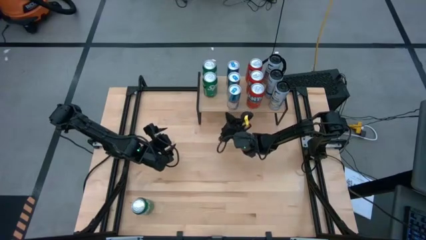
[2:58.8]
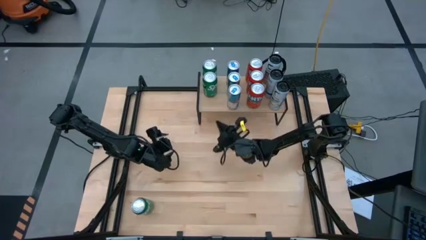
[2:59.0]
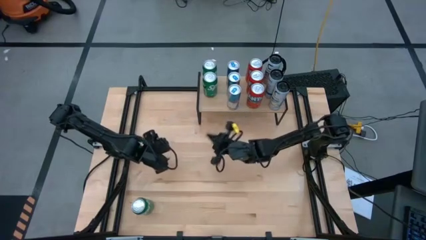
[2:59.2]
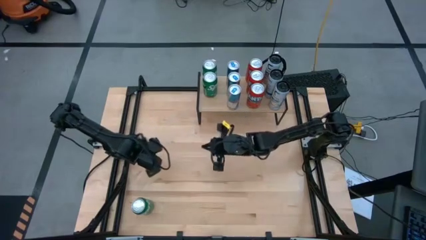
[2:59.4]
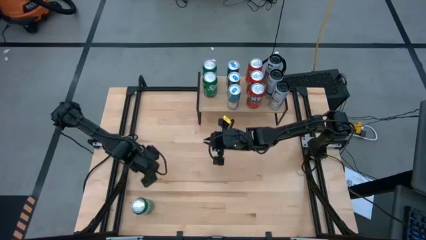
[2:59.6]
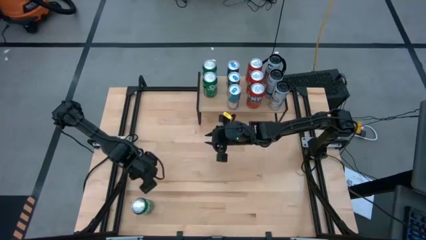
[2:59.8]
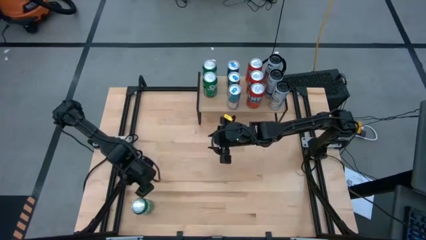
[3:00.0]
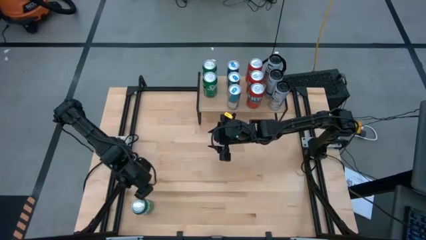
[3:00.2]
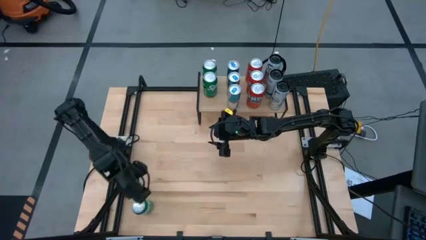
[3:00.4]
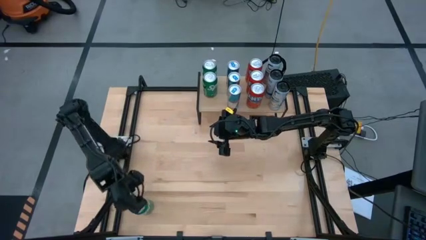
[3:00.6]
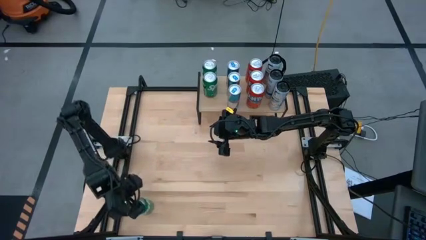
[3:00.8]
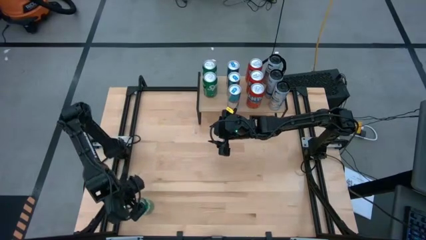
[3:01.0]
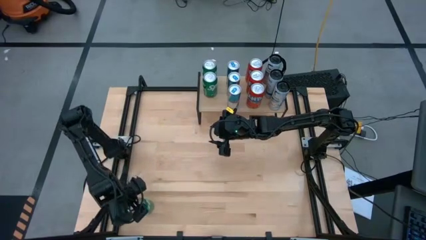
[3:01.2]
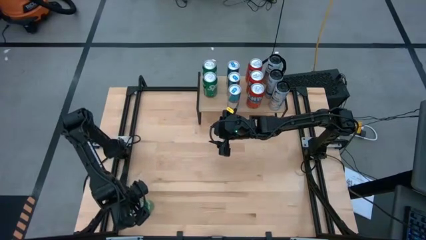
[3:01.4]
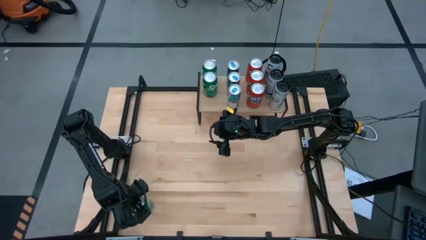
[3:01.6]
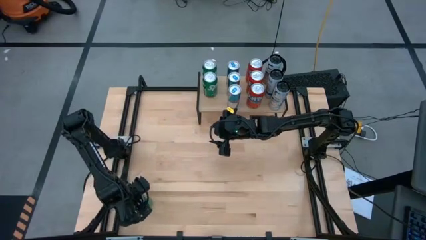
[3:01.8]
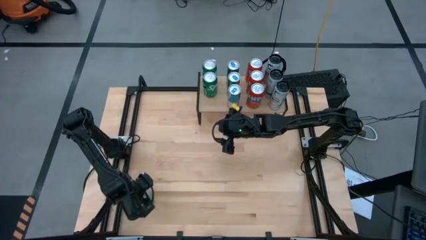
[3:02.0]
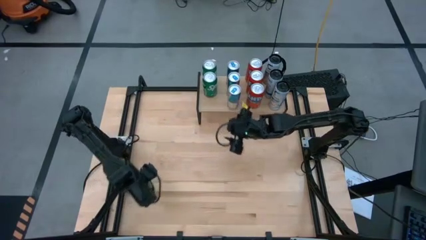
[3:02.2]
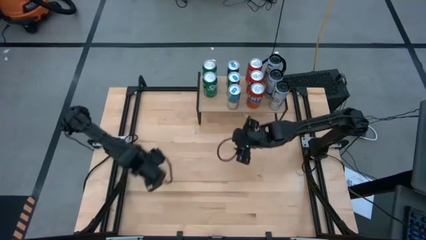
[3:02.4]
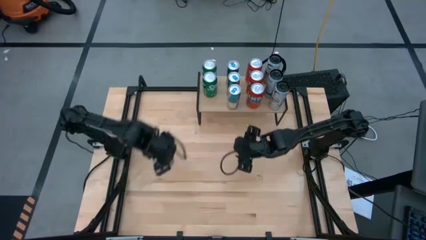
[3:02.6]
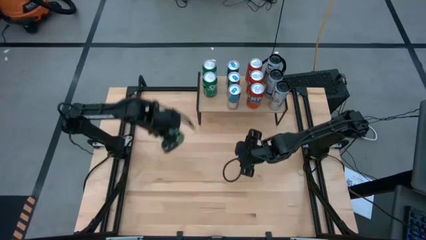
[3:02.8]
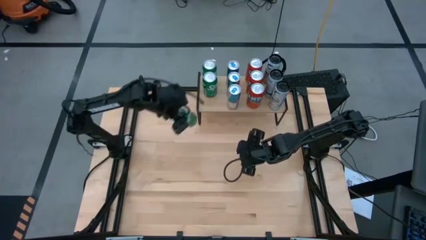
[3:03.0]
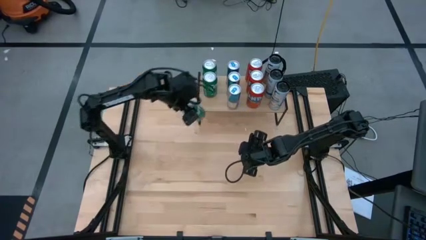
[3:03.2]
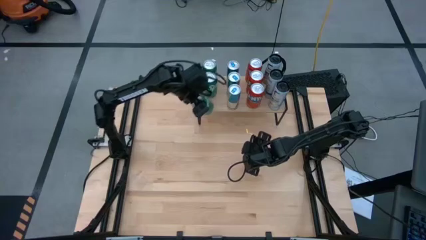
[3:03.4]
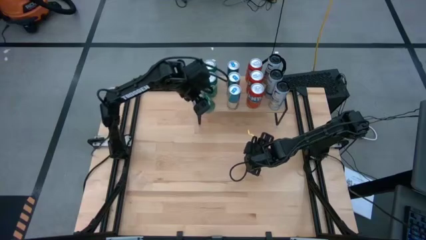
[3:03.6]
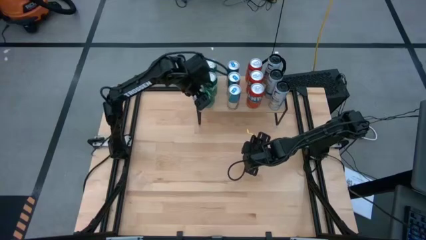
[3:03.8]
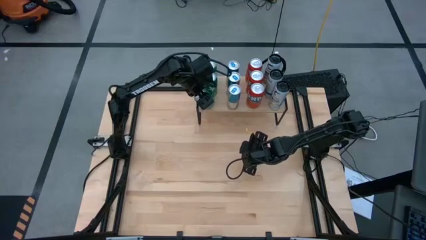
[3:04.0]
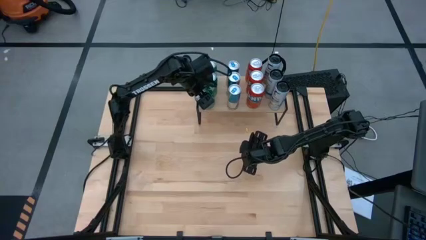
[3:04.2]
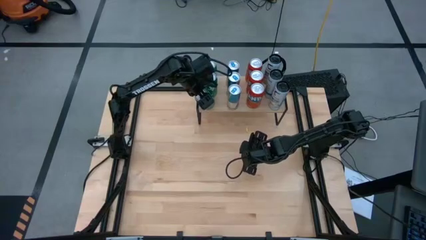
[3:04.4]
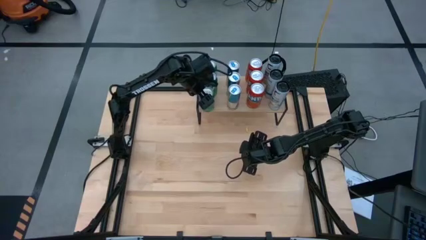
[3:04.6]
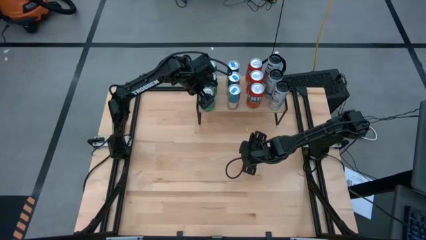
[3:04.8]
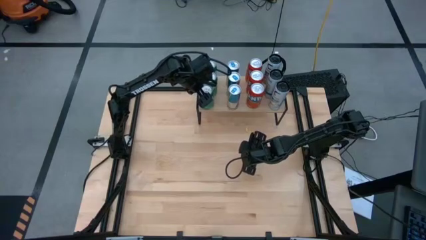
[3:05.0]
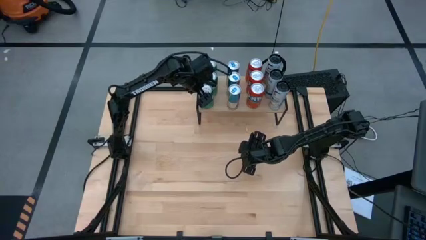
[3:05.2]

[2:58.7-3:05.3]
Task: Place canned beverage on shelf
Put the green soda can on the shelf aligned with the other green soda cans

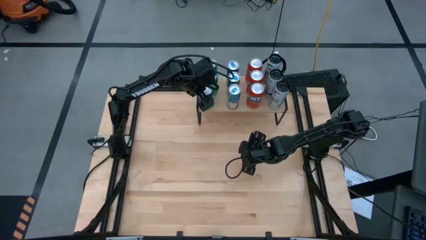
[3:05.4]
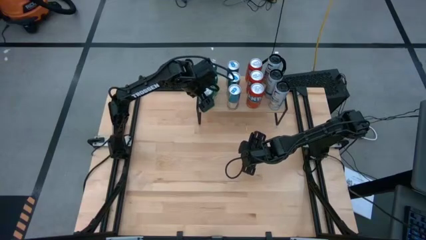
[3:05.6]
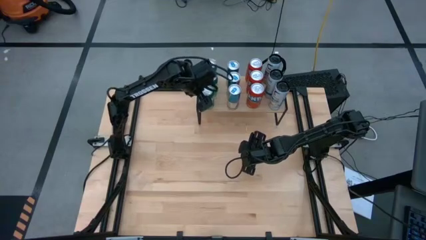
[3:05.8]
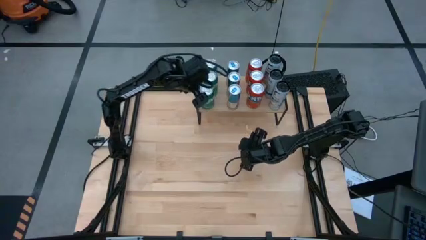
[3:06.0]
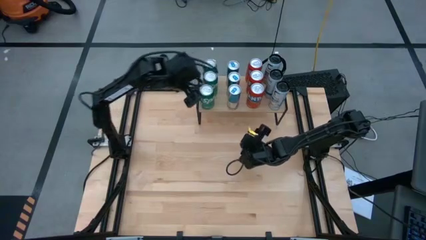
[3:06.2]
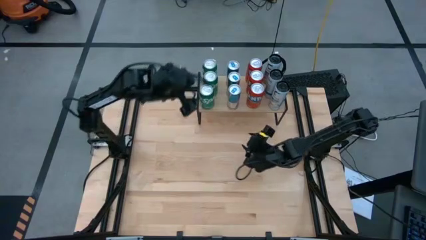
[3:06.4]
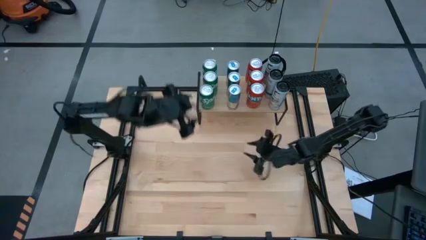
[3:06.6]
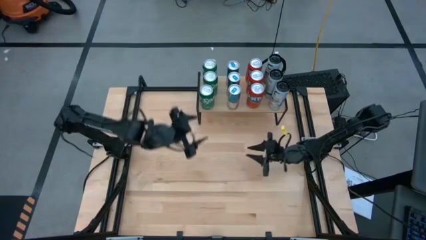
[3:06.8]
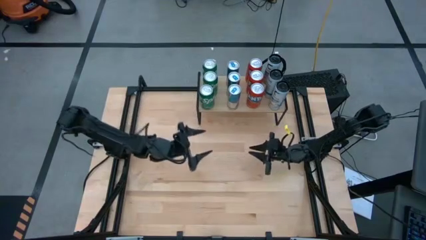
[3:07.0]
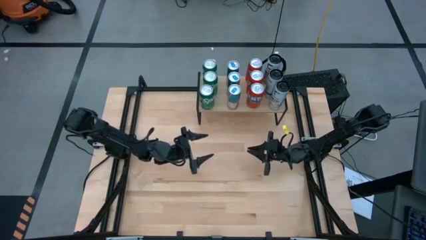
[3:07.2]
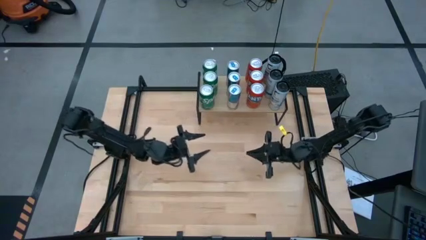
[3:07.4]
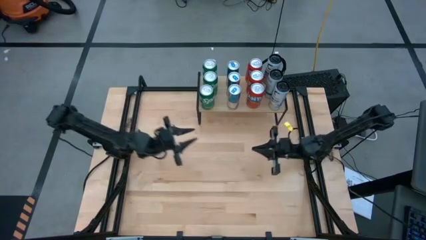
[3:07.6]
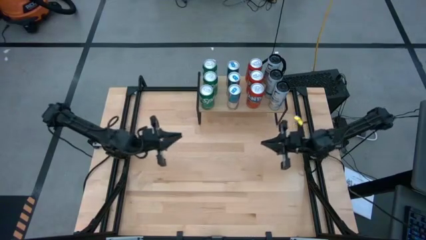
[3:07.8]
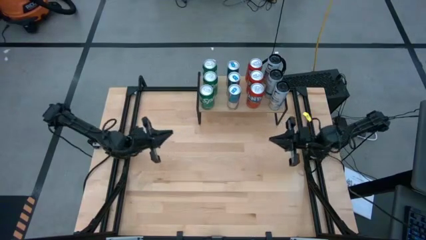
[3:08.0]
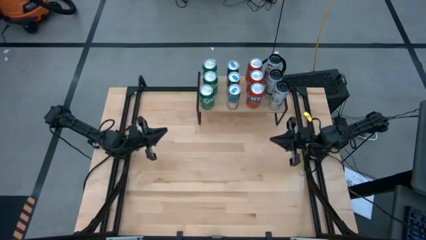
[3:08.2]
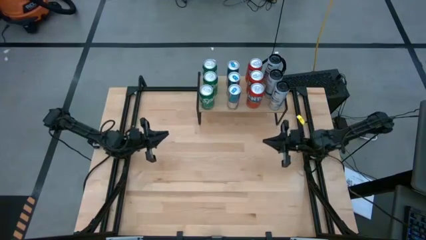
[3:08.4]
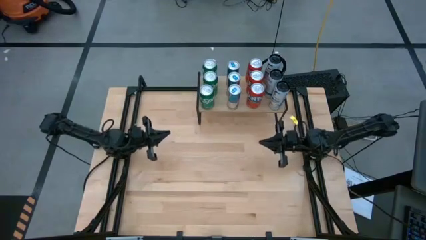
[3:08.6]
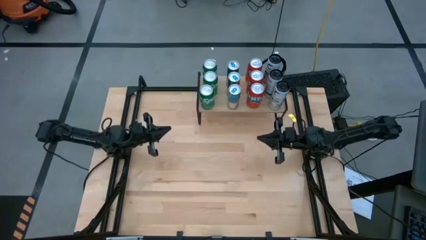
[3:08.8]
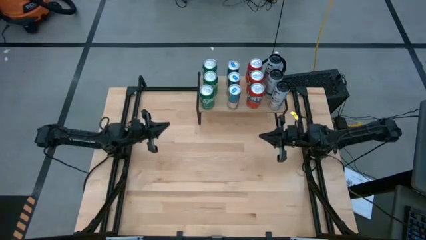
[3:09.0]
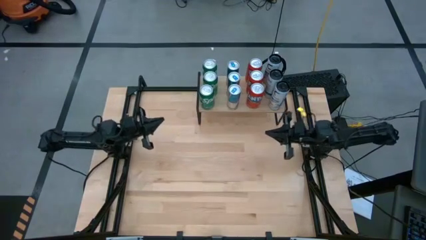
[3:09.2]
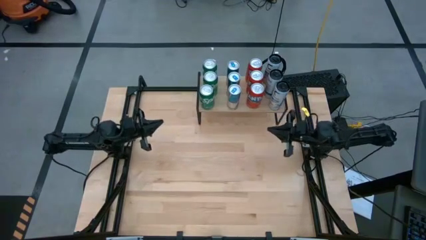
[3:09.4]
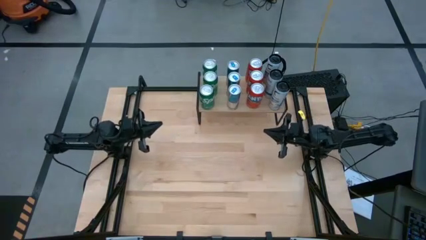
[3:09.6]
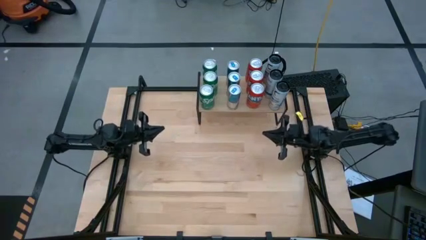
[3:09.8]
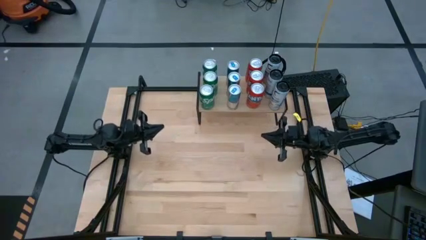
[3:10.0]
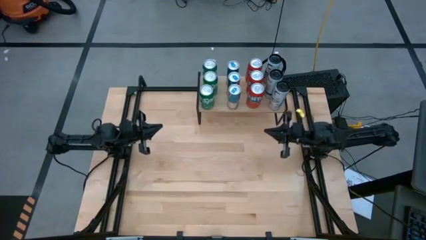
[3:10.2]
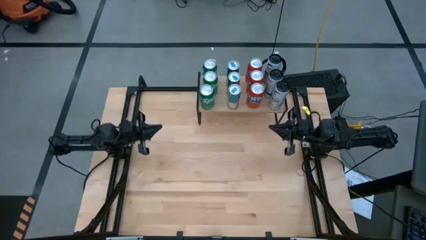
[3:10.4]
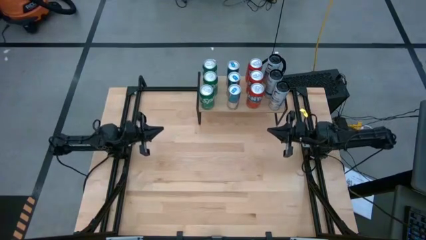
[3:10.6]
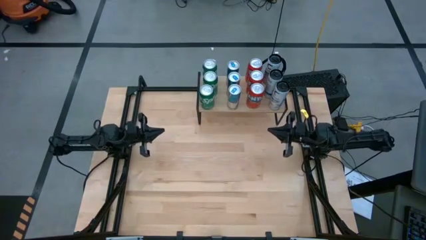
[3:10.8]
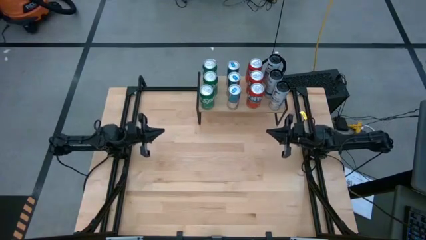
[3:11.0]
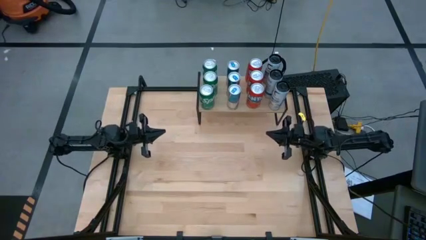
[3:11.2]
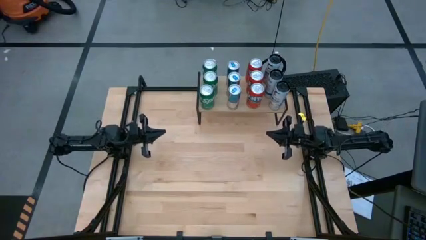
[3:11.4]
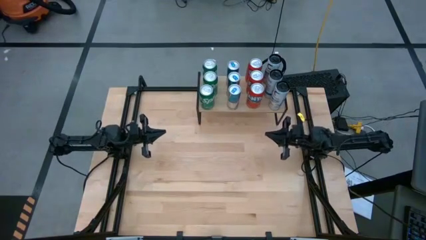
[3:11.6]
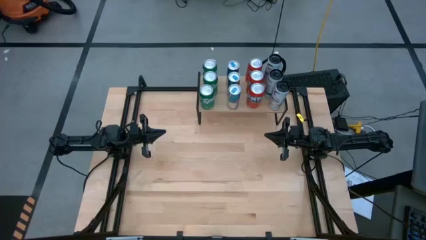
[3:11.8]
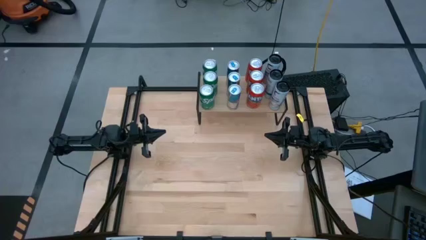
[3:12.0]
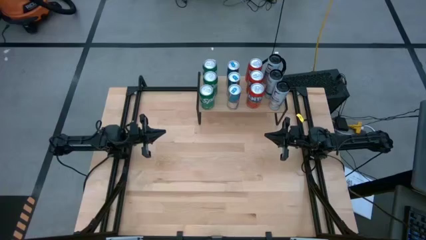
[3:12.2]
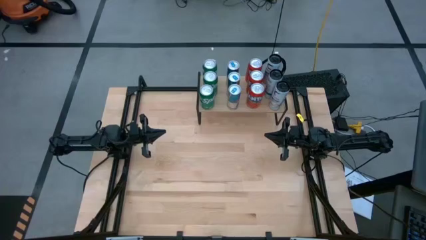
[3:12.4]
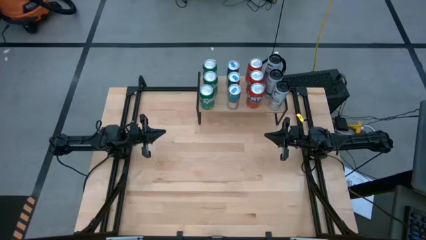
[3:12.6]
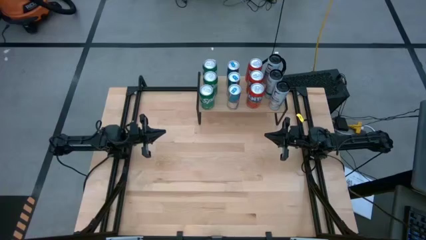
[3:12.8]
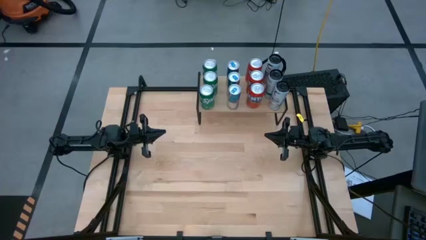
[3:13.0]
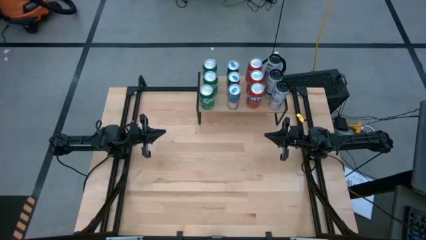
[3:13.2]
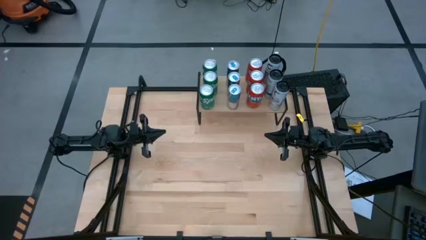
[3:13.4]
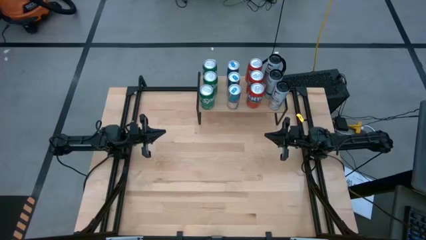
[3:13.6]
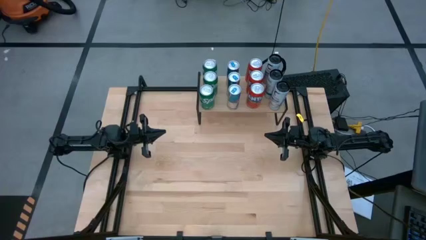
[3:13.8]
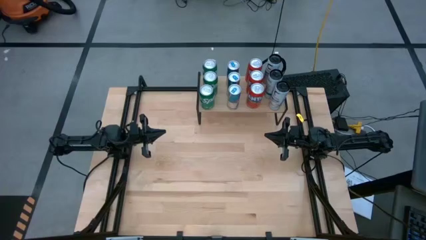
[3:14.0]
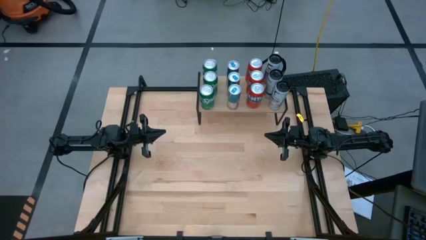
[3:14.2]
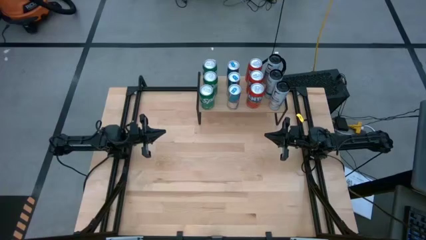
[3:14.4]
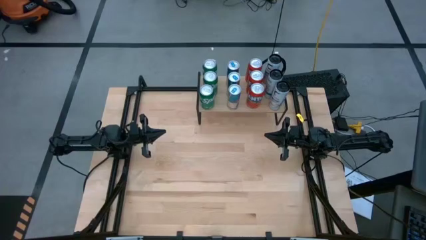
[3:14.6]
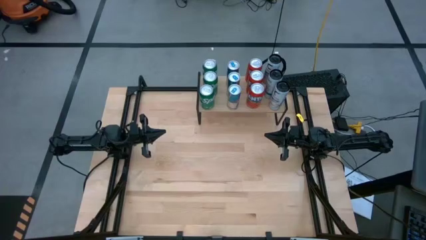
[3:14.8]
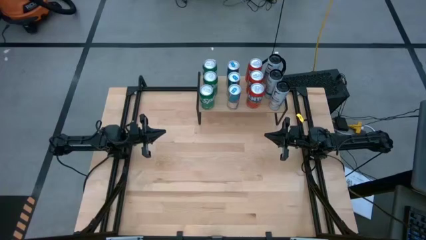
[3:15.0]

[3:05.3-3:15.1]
Return to Home Position

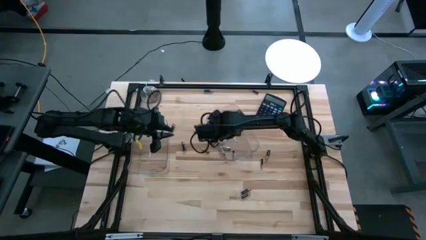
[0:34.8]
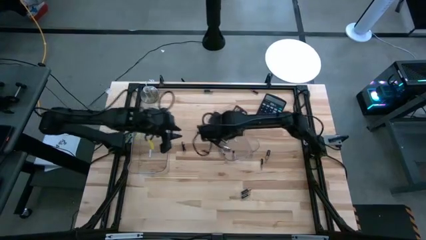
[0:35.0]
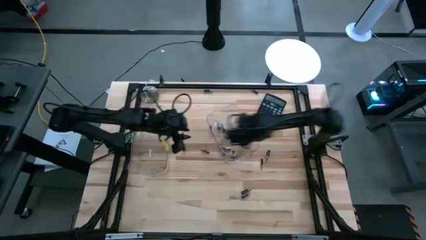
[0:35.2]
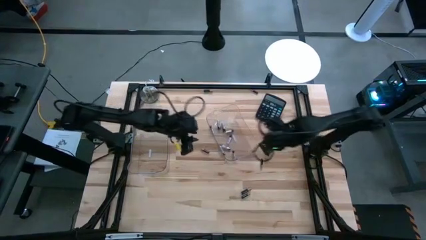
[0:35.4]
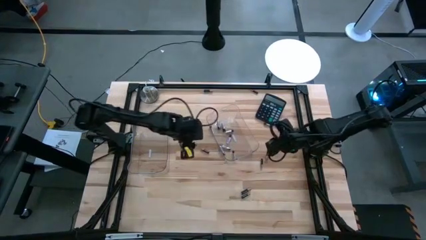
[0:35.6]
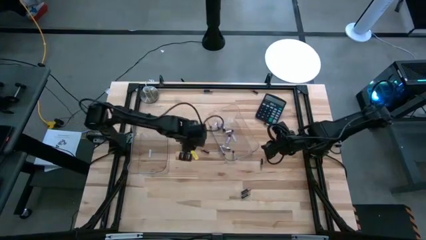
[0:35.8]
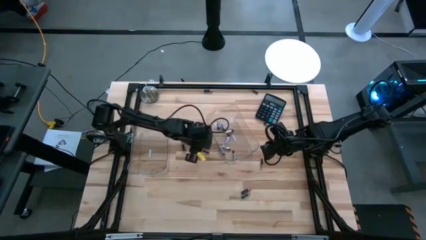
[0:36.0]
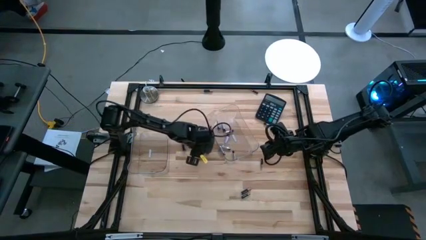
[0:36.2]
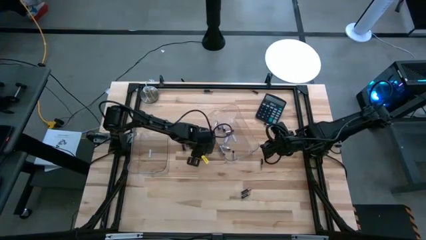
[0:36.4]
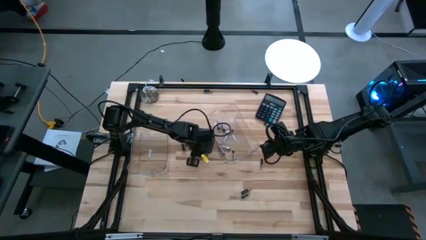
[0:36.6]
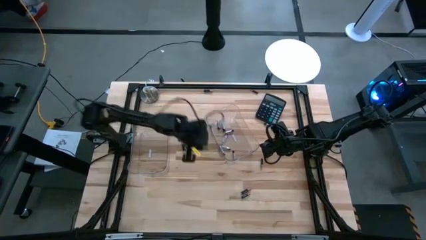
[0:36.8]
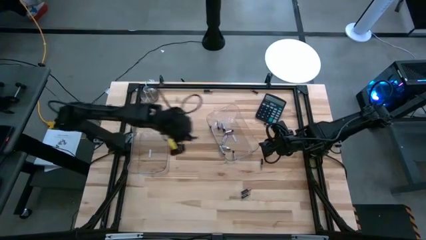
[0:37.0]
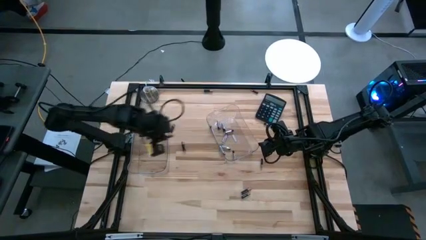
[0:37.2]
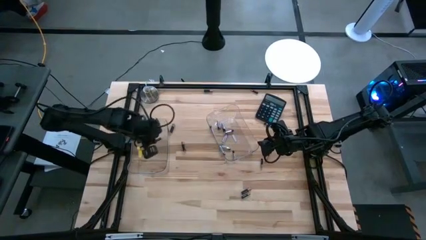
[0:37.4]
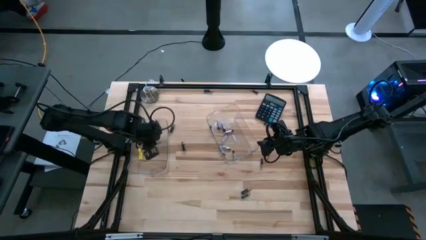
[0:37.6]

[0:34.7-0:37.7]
Task: Sort batteries
Put the black battery into the left transparent bin
